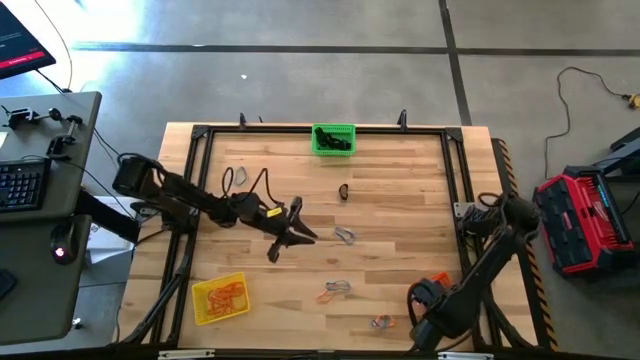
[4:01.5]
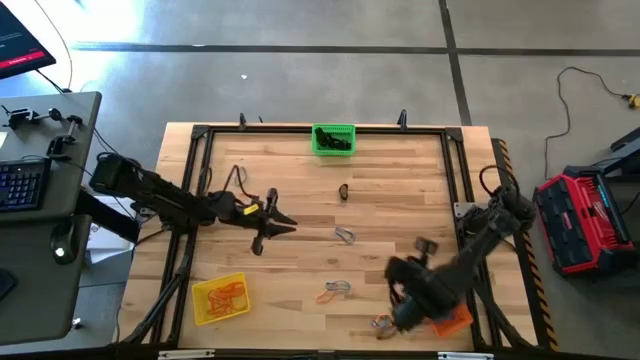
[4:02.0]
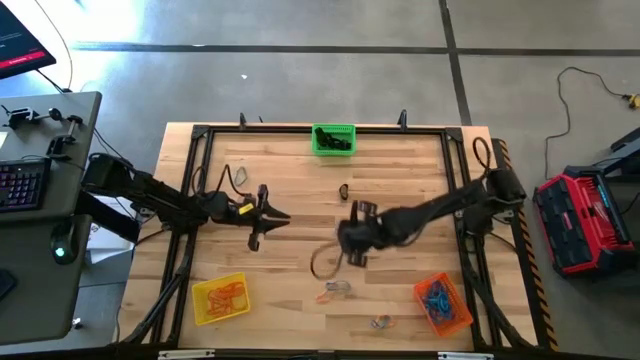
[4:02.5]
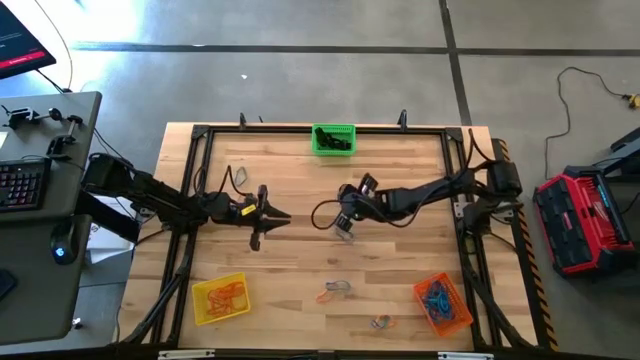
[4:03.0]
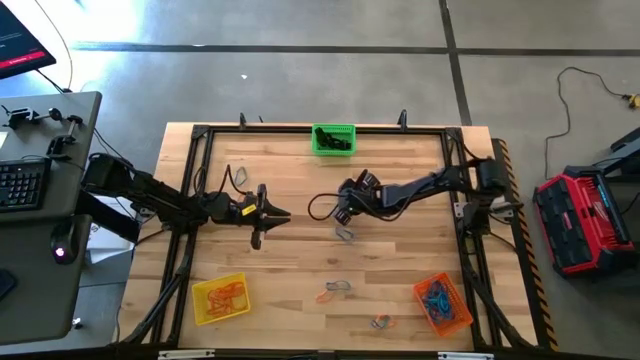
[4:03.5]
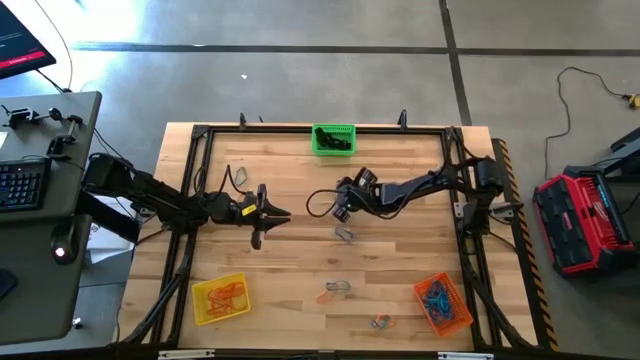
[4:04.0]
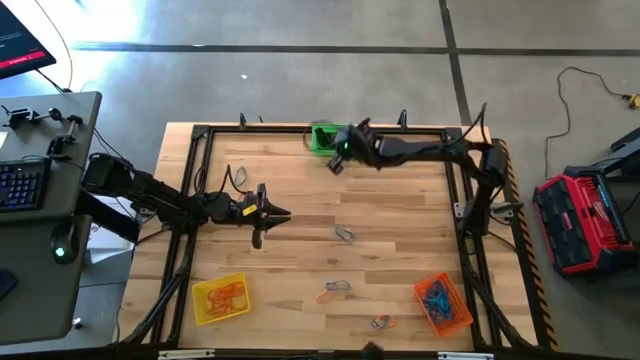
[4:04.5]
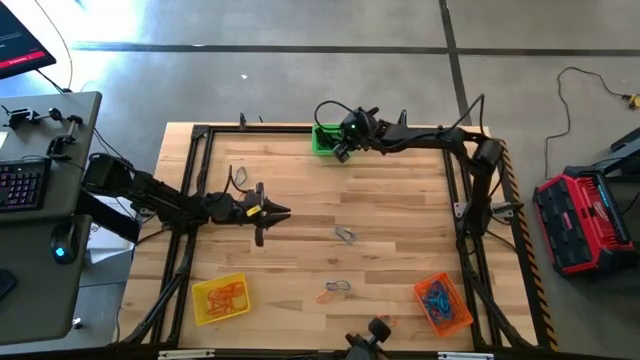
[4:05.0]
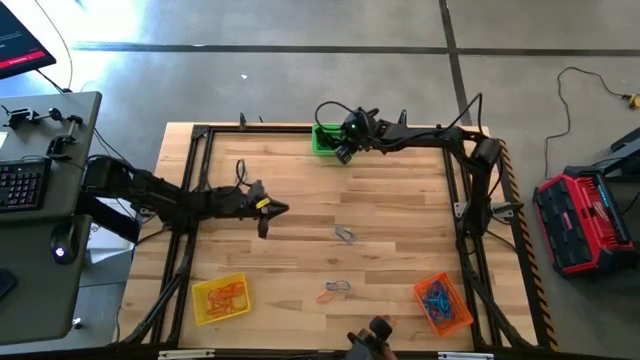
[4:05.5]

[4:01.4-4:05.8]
Task: Sort rubber bands into baskets
Put the black rubber band into the green bin

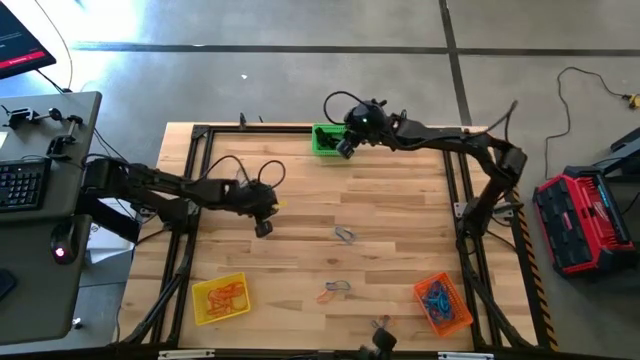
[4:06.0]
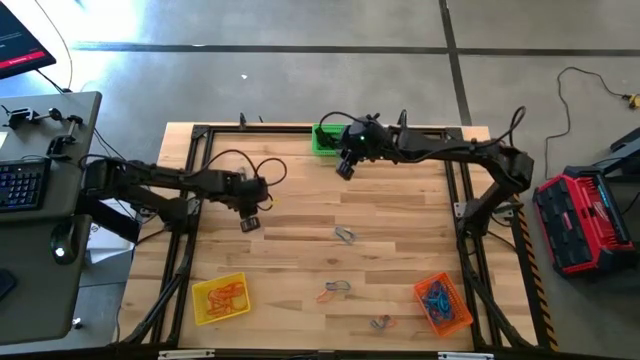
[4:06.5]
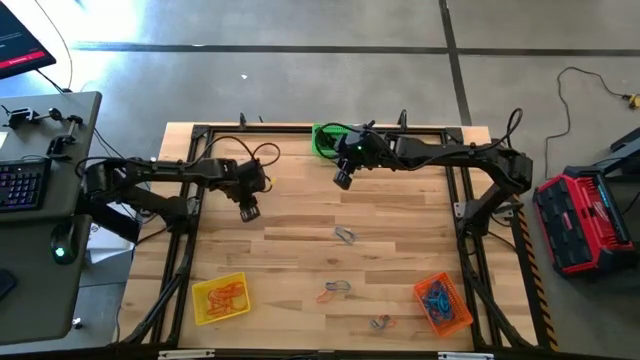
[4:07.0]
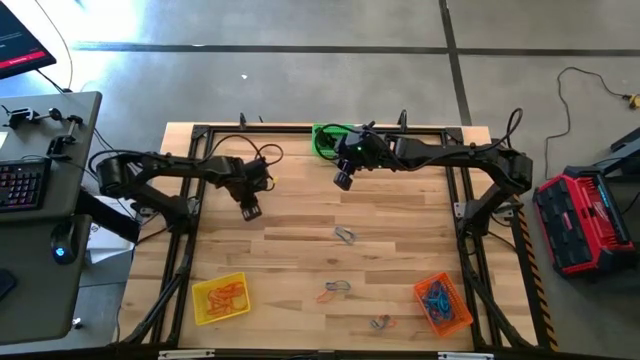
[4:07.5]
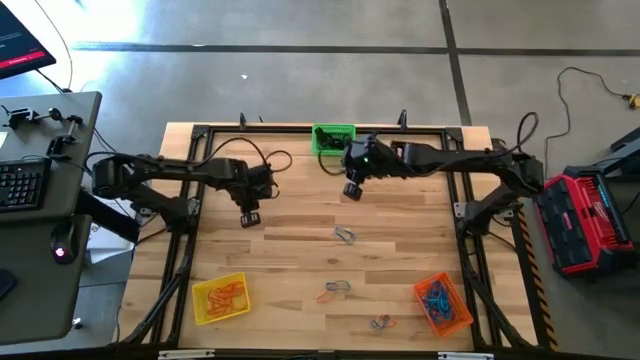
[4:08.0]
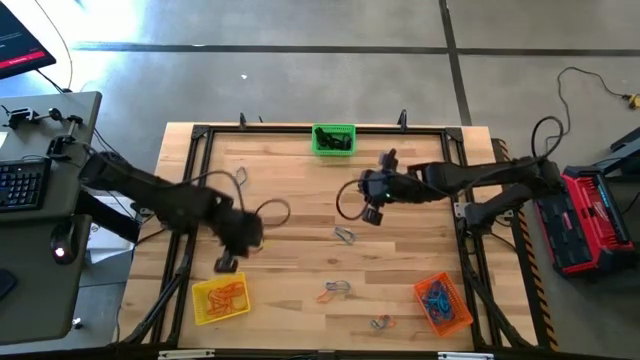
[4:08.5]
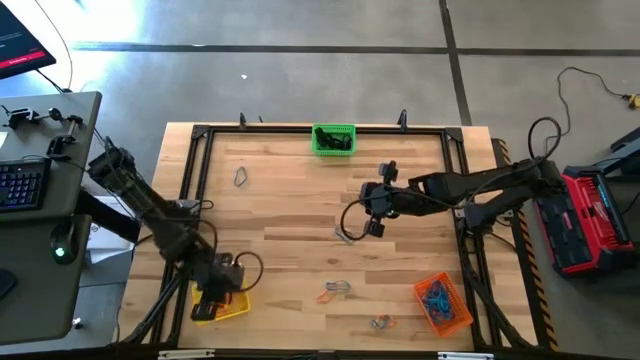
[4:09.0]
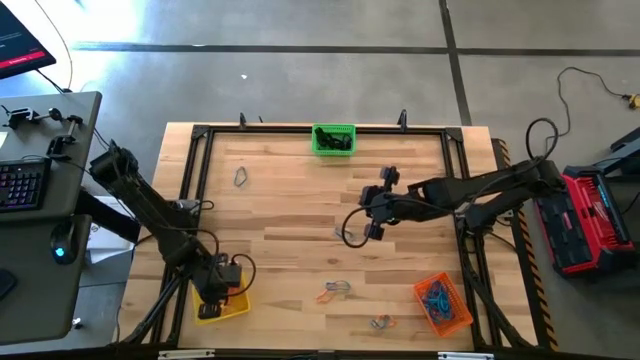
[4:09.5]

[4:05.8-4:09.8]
Put the orange rubber band into the yellow bin

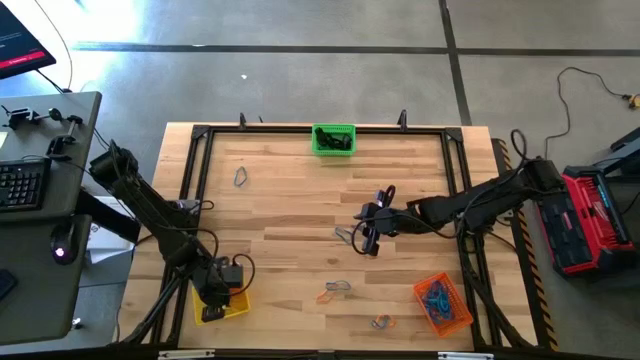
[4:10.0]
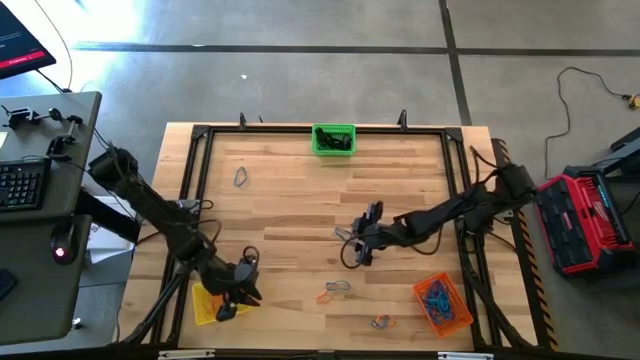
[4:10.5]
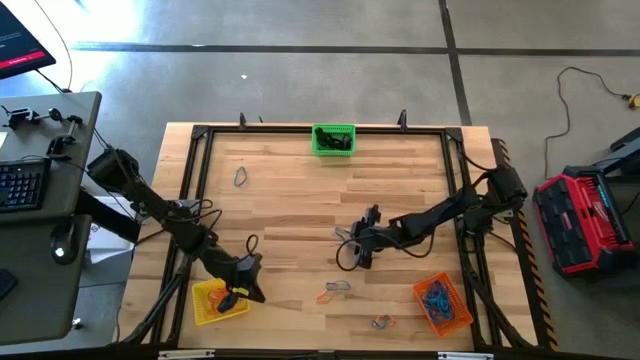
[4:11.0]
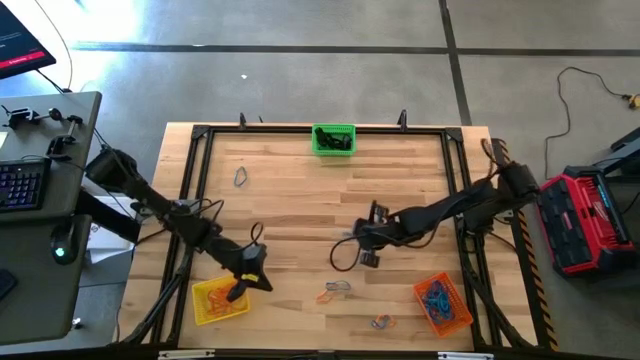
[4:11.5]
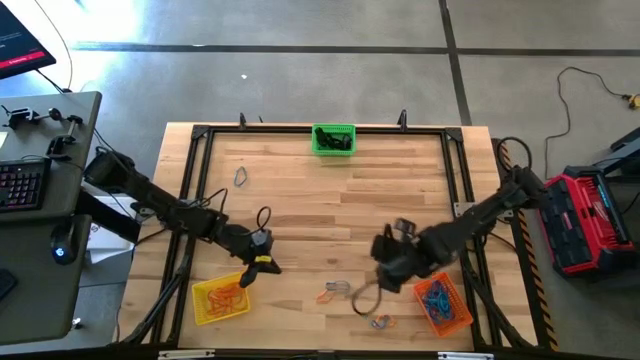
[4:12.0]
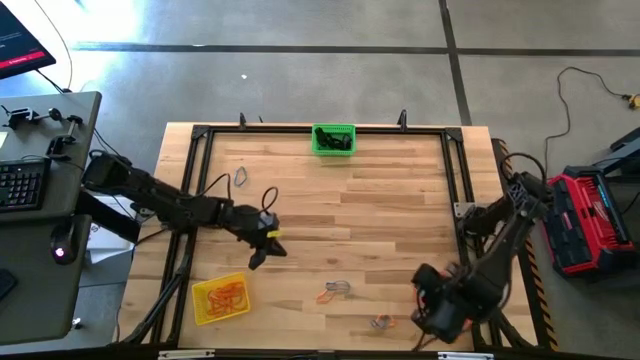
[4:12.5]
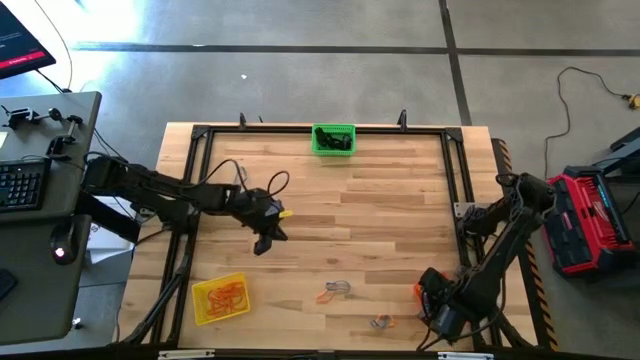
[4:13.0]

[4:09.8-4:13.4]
Put the blue rubber band into the orange bin

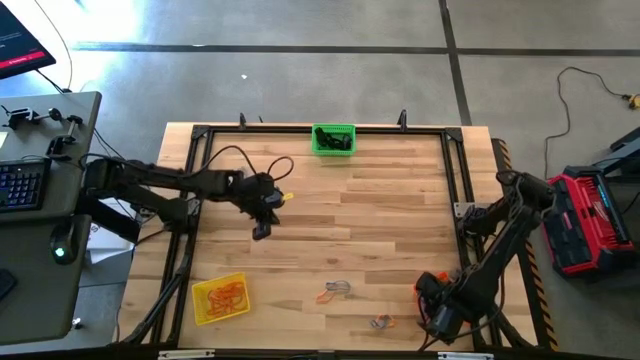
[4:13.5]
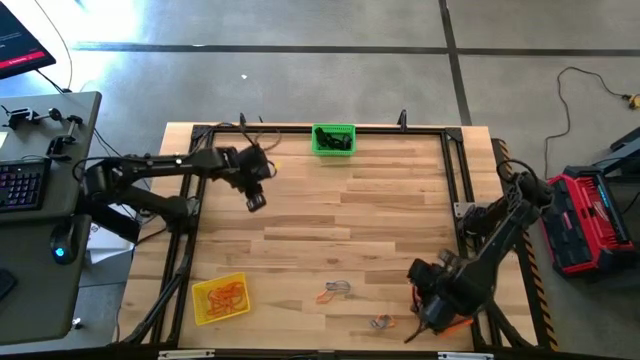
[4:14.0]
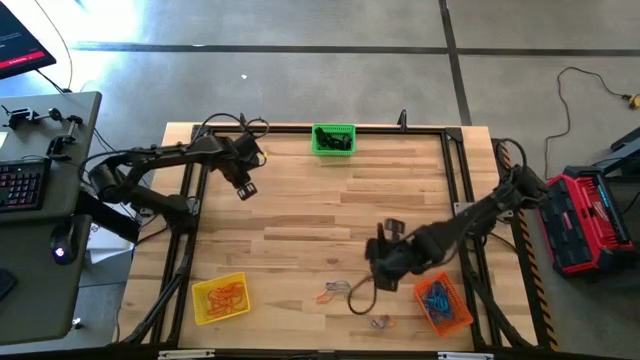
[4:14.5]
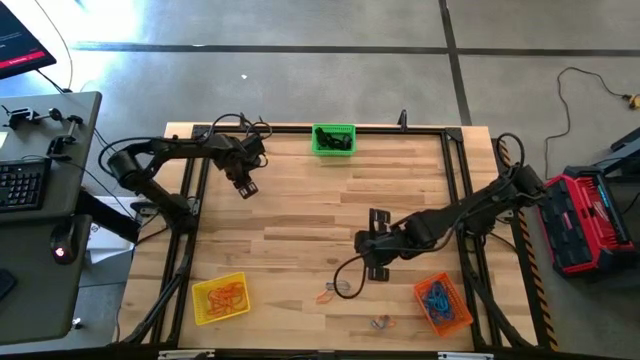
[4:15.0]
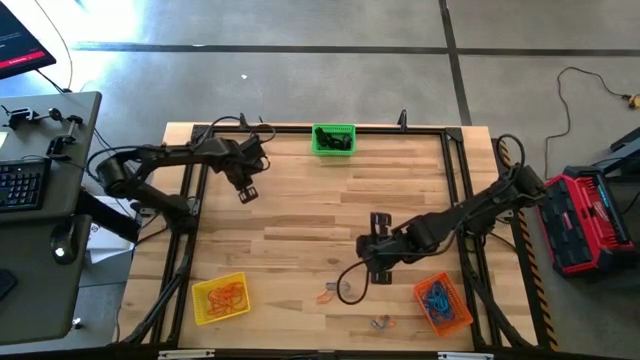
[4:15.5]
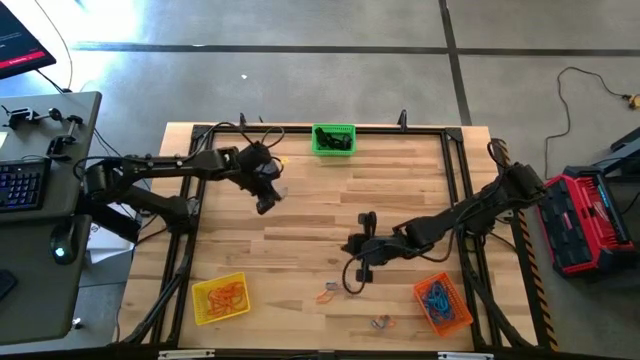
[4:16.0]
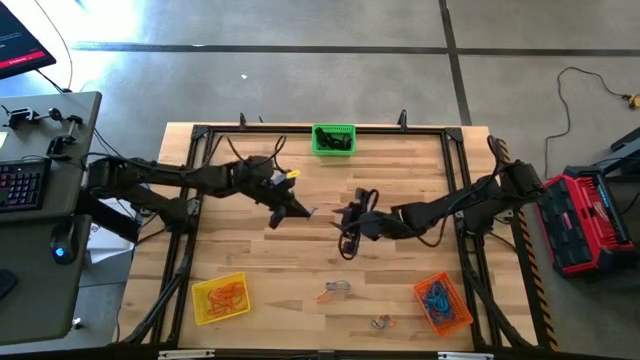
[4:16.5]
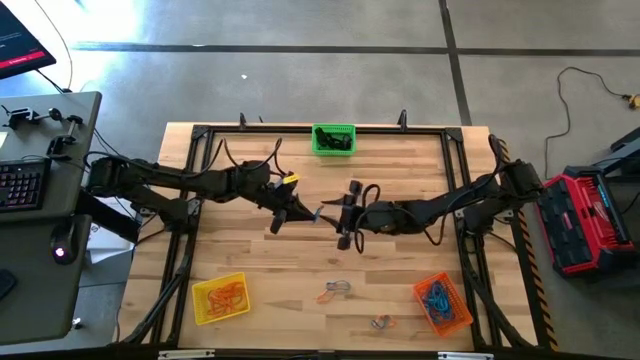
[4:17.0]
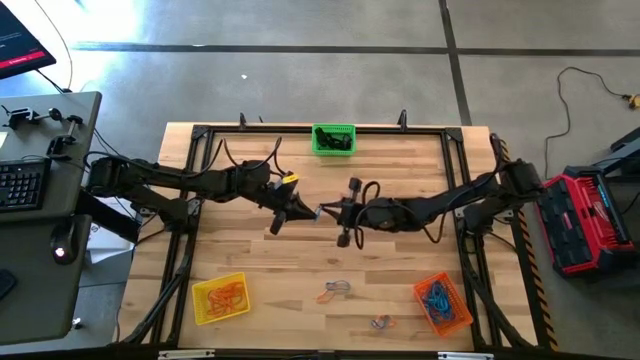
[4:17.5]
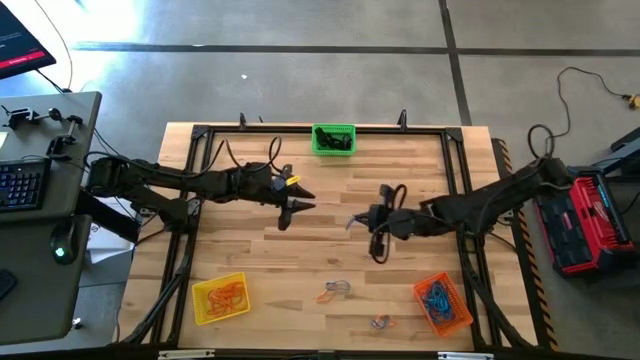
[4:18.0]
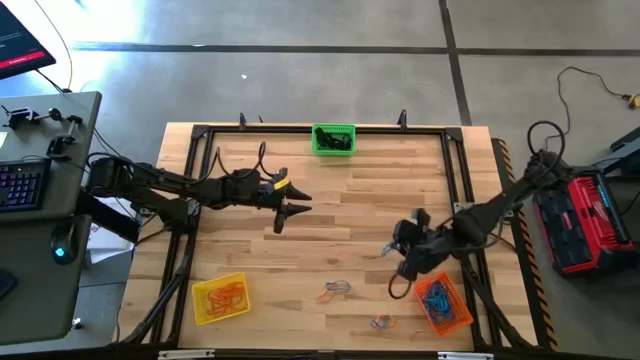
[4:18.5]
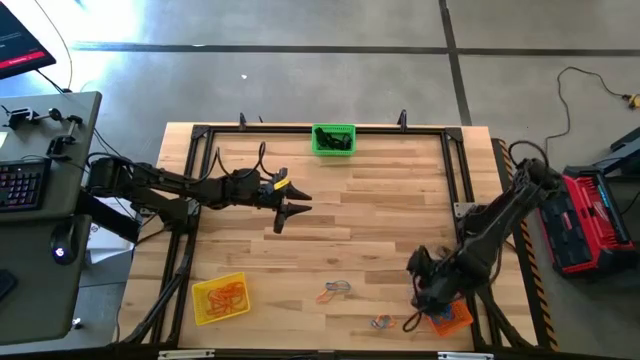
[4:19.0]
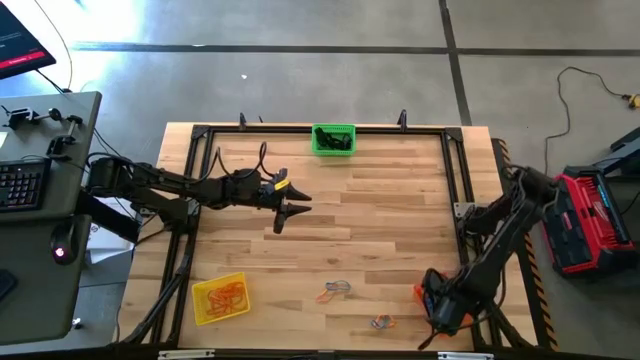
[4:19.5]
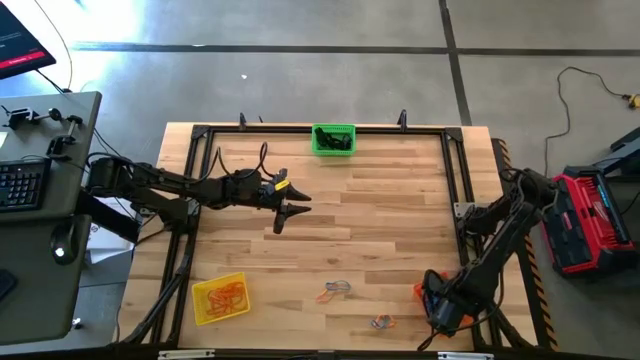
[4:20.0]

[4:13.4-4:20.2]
Put the blue rubber band into the orange bin

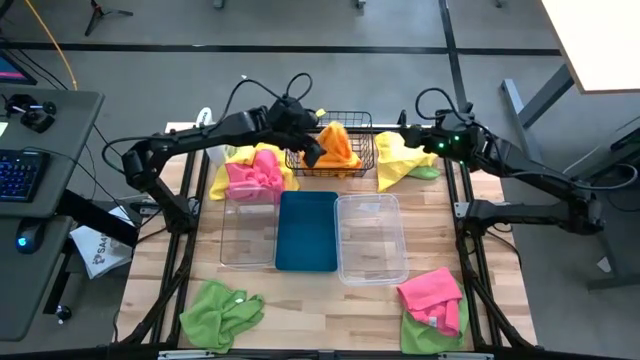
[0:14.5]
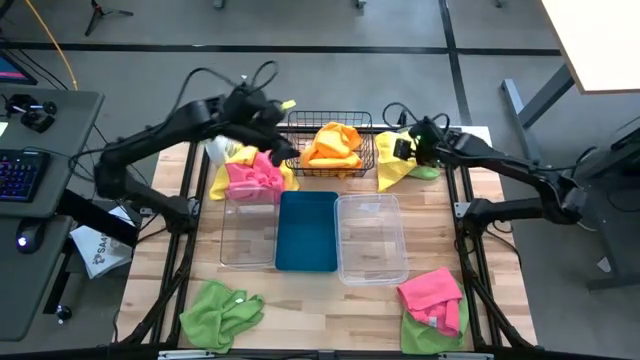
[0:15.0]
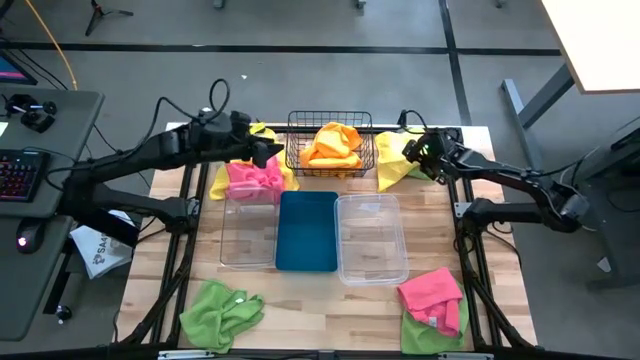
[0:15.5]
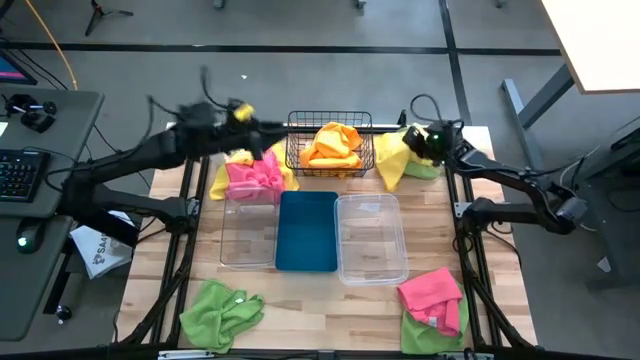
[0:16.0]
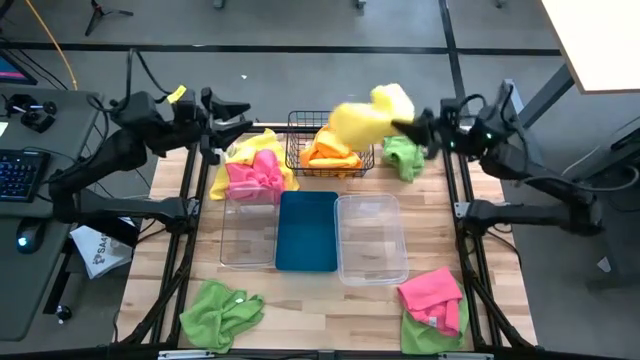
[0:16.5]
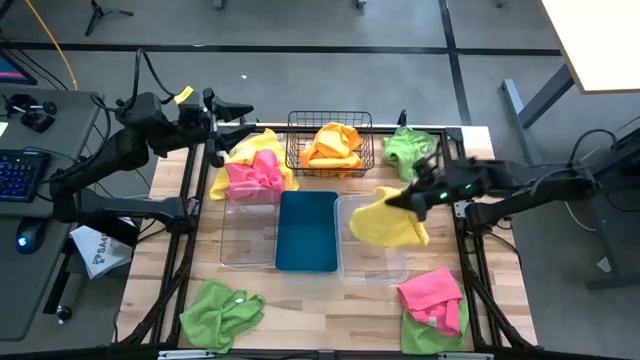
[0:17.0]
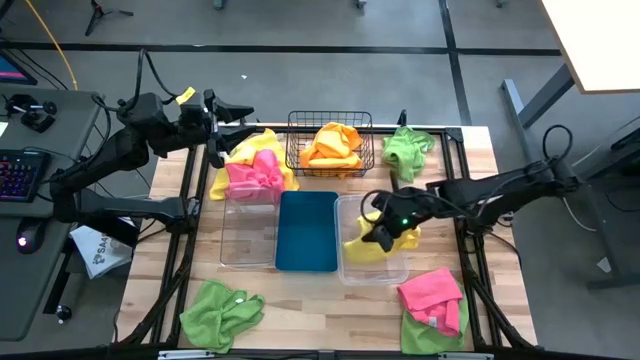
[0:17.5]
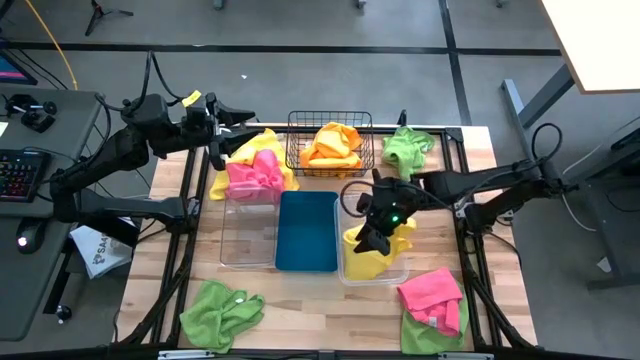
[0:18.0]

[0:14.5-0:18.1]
Task: Sort microfiber towel by color & place in baskets
Put the right yellow microfiber cloth into the right transparent bin
